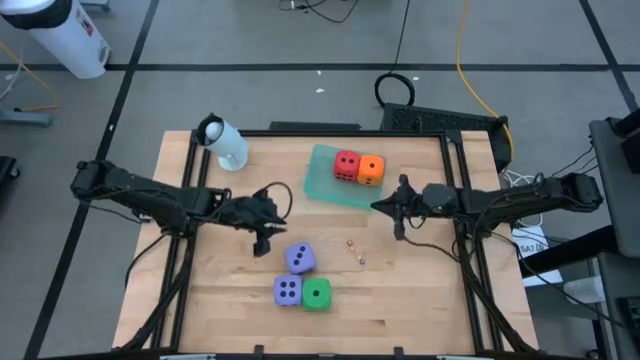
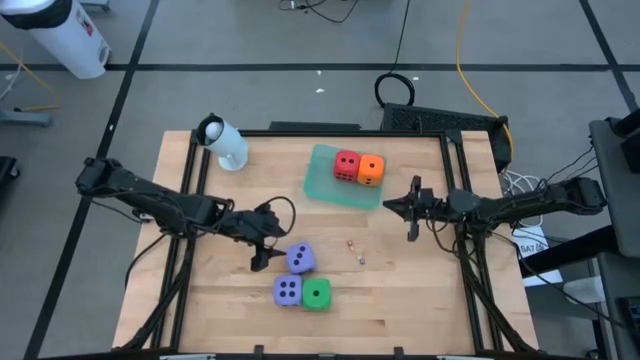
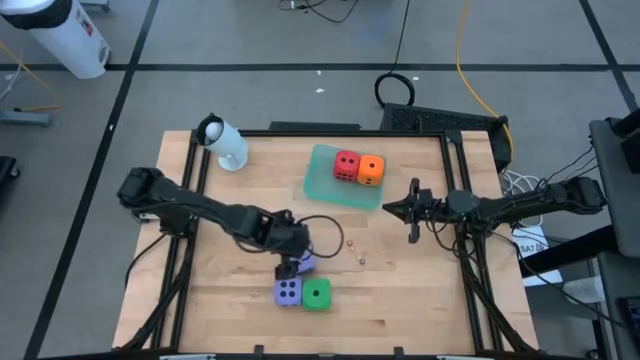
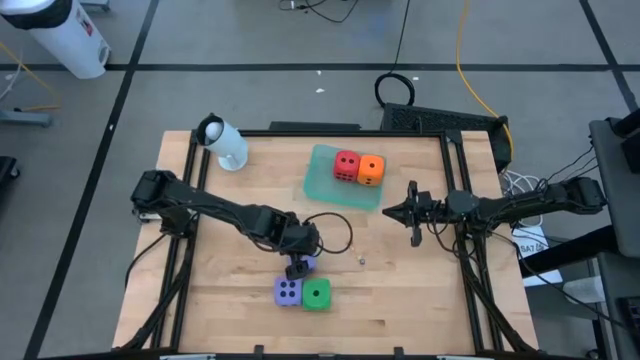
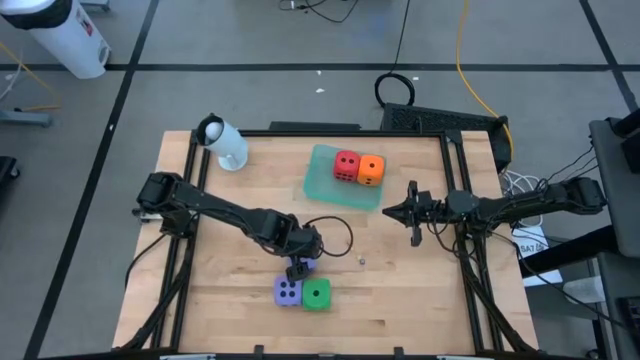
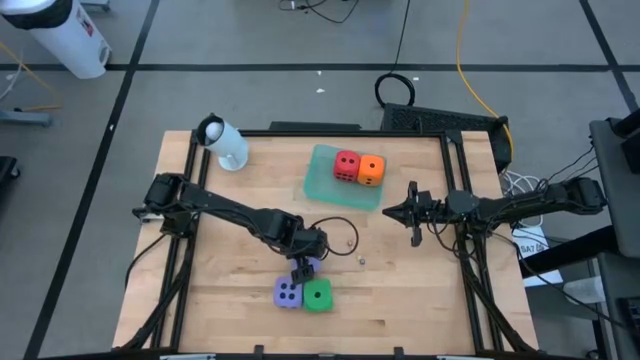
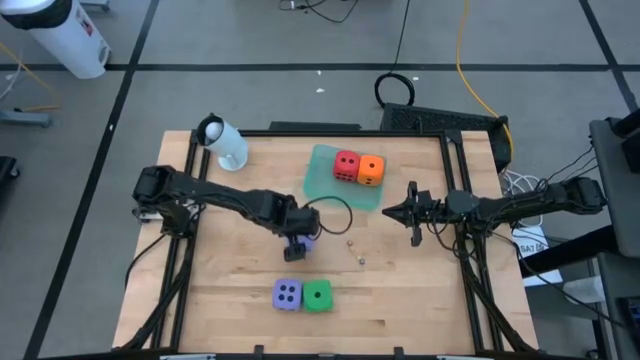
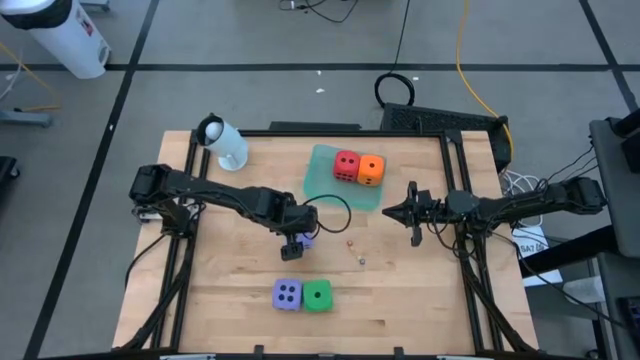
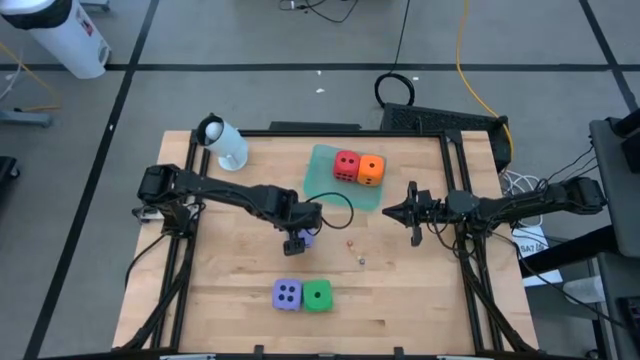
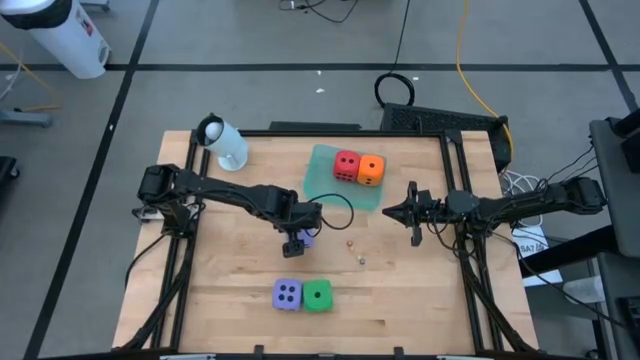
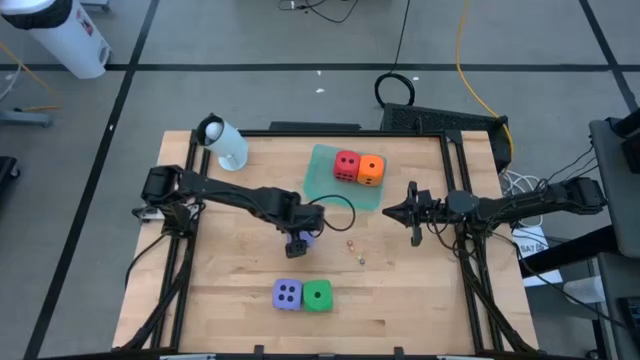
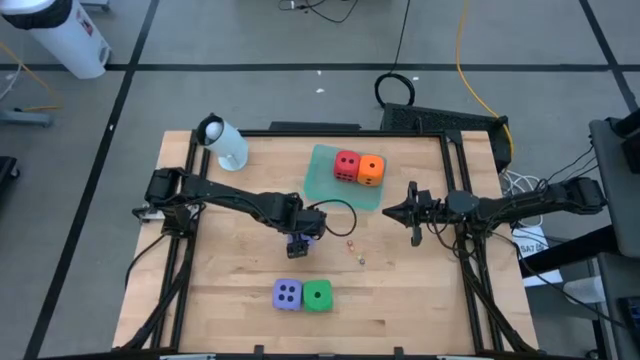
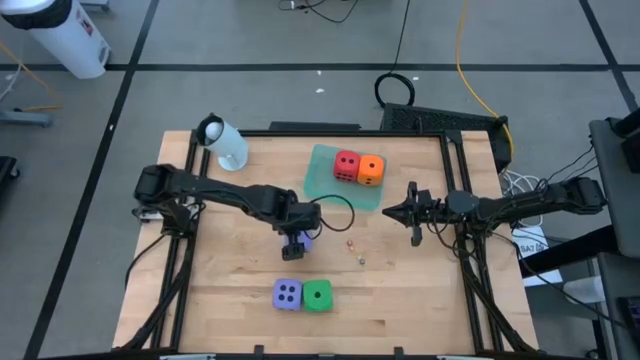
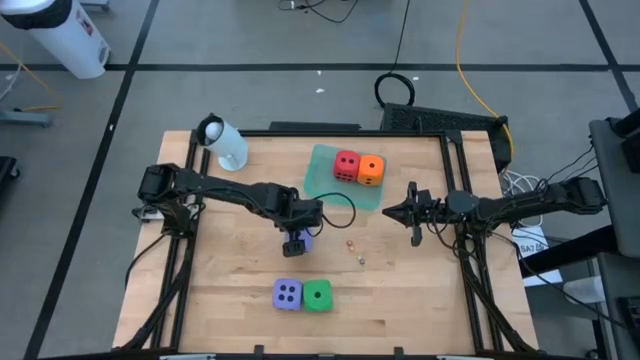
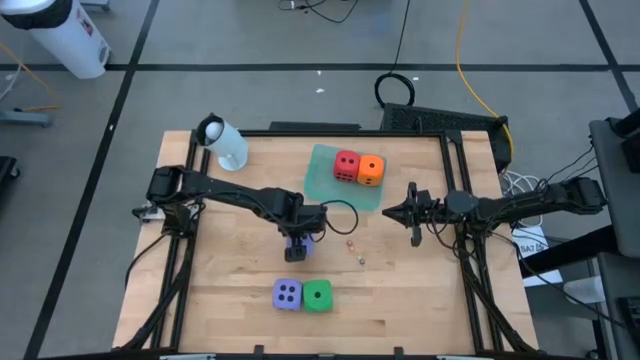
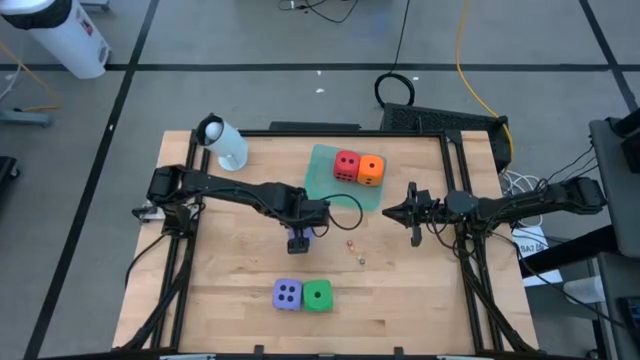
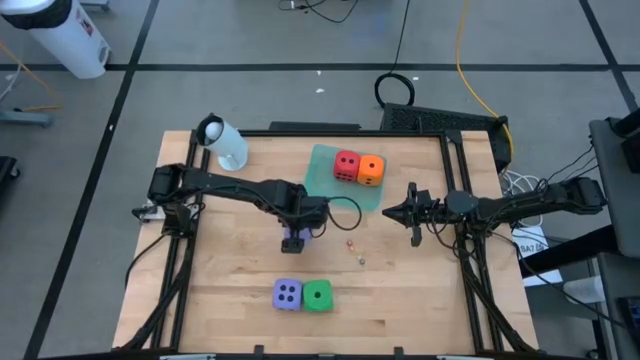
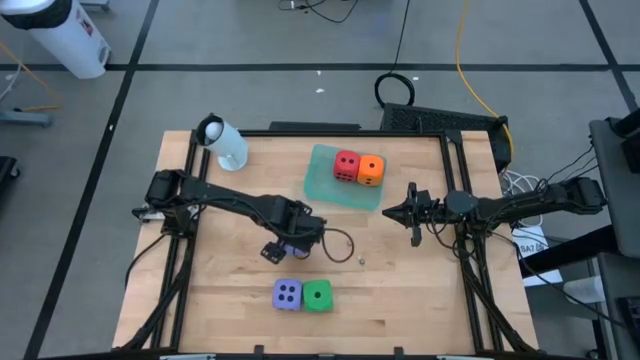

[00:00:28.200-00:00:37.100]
Task: Pick & Place Dice
Put the large purple die into the green bin

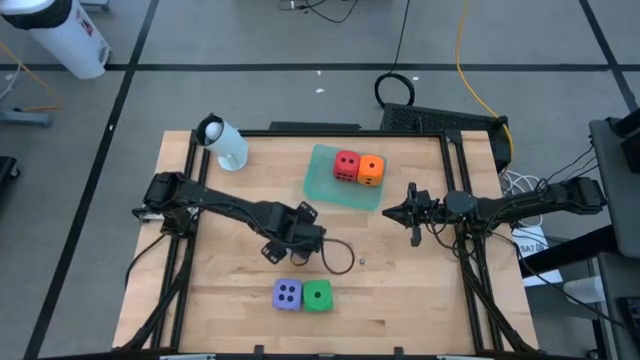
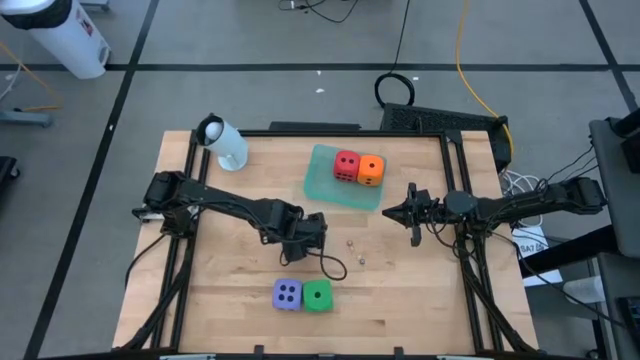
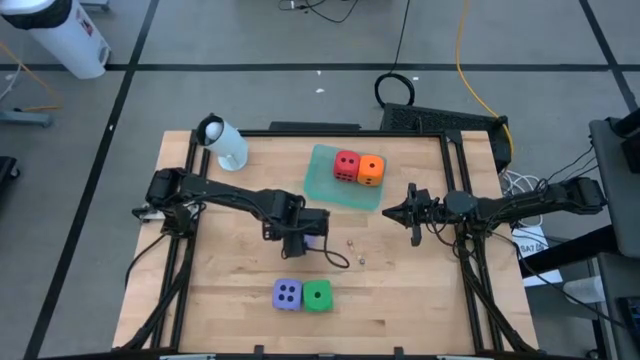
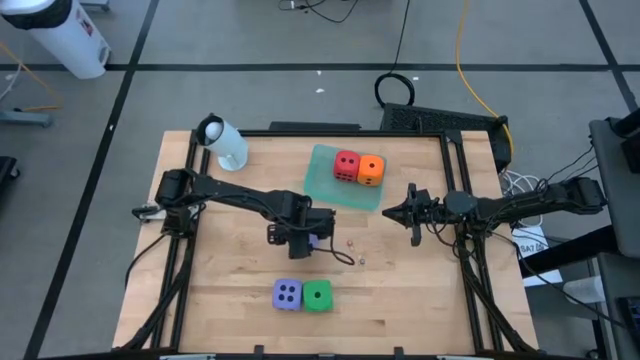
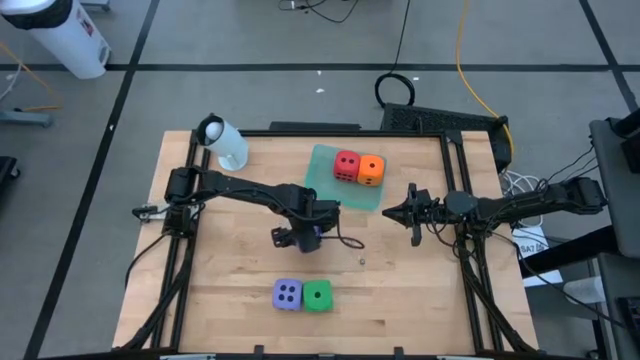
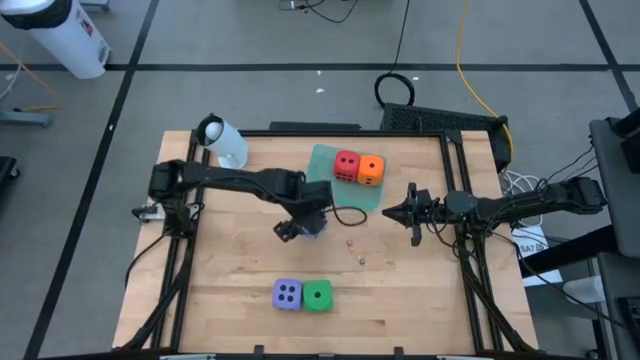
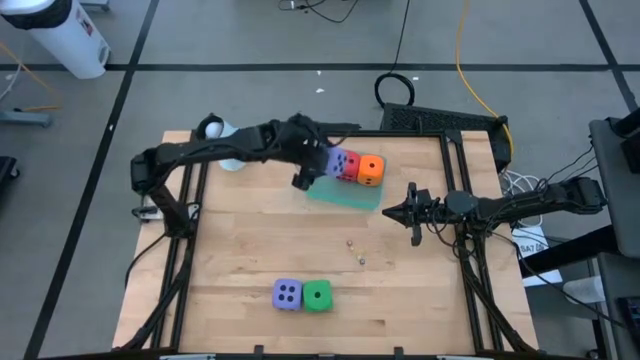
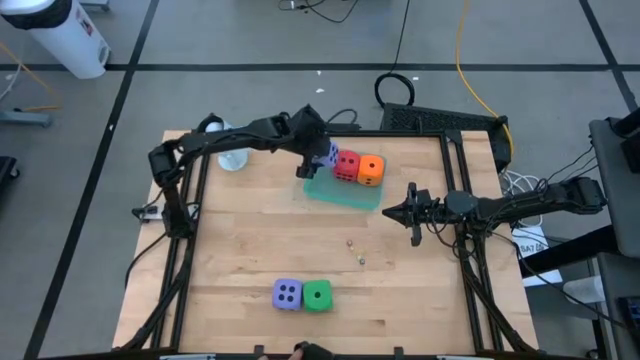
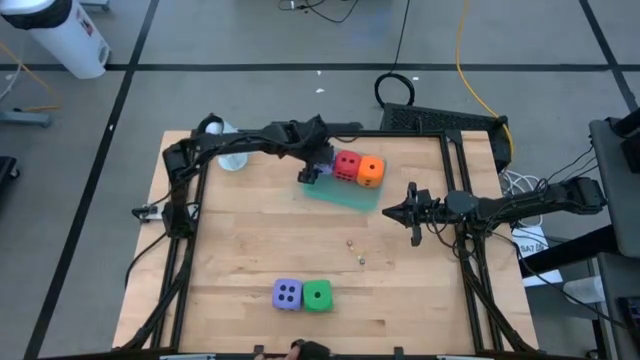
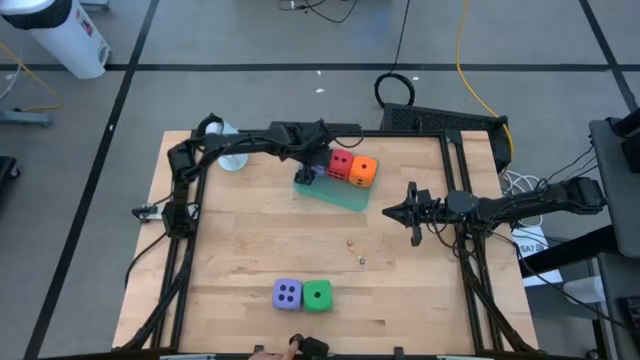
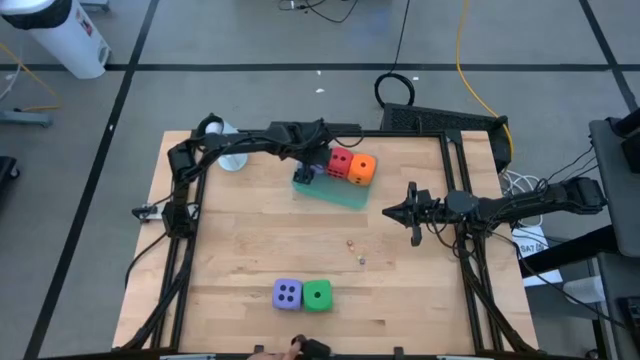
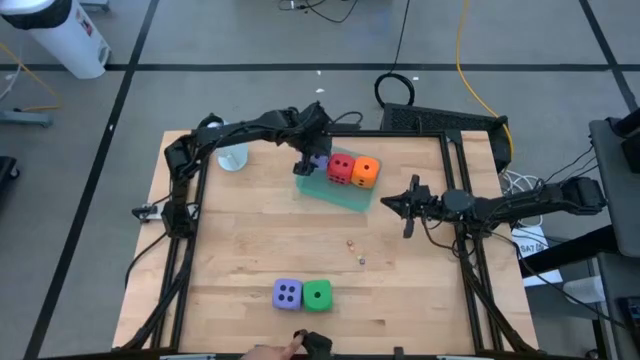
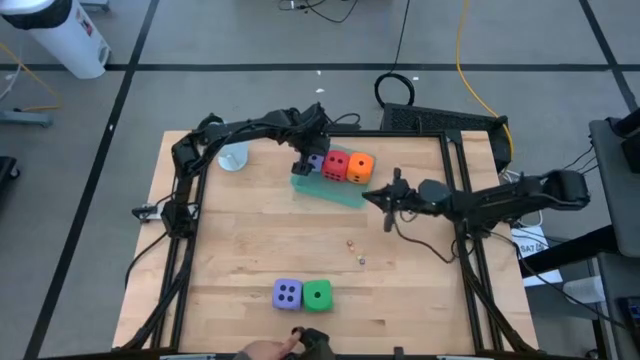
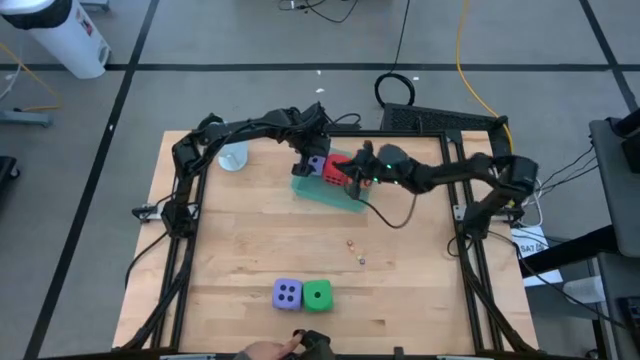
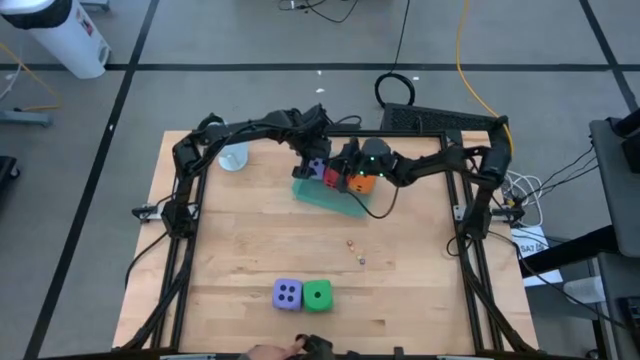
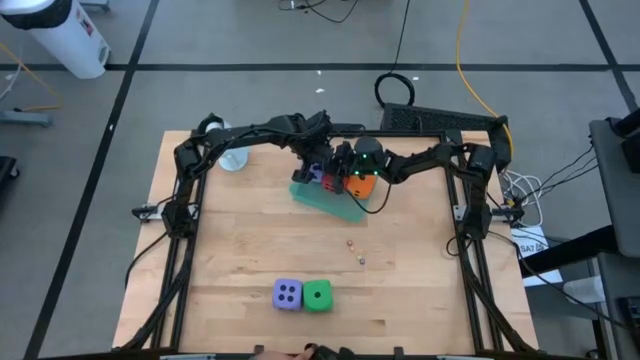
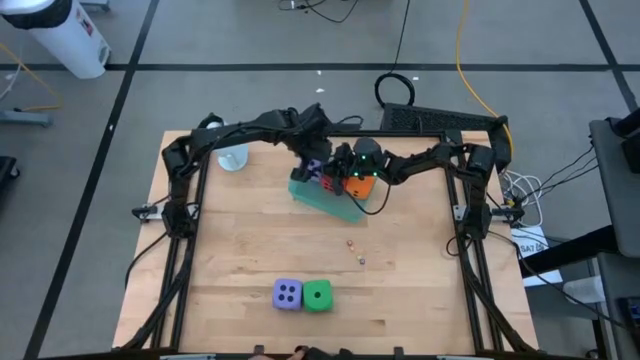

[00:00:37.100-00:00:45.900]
Put the top large purple die into the green bin

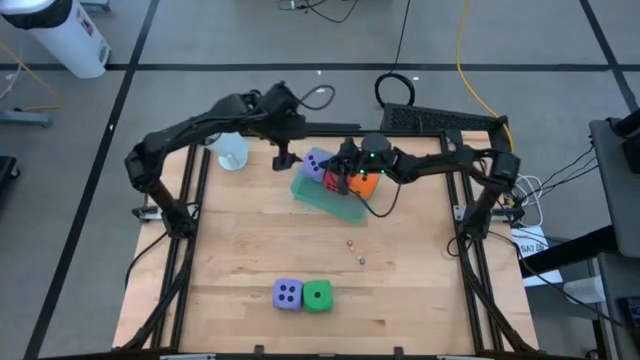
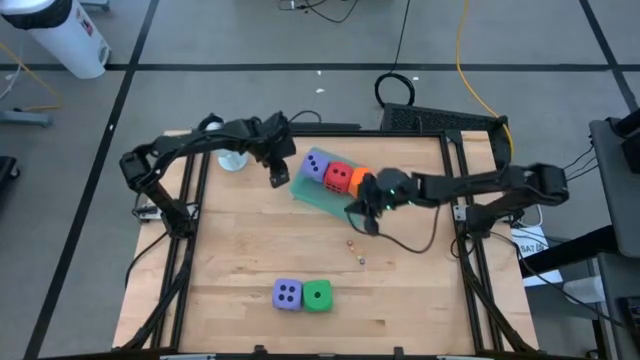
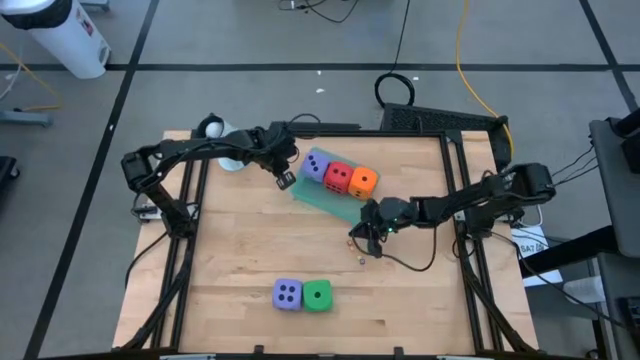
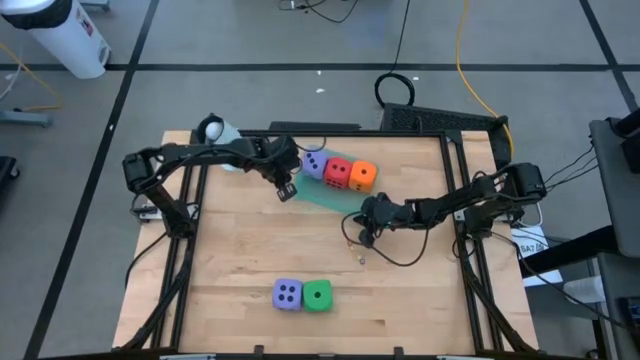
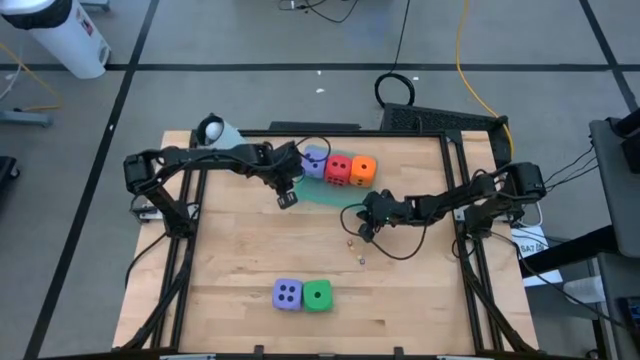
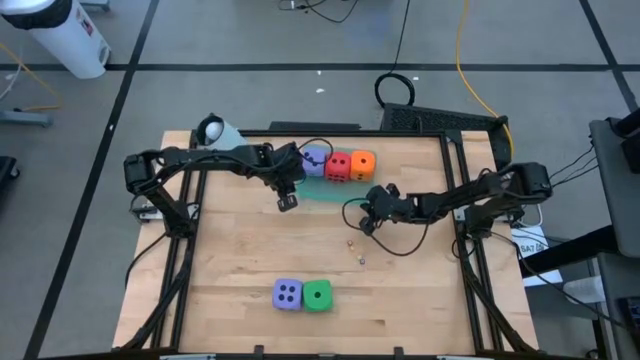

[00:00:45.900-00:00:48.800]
Adjust the green bin on the table
